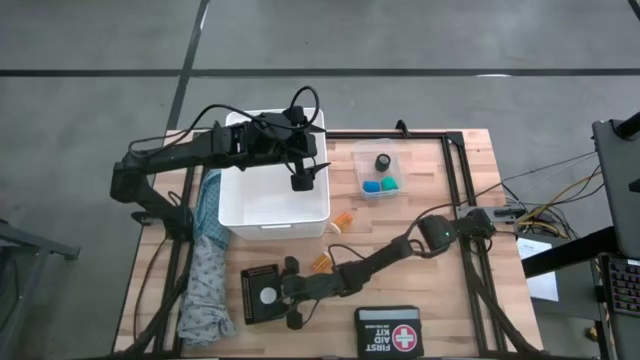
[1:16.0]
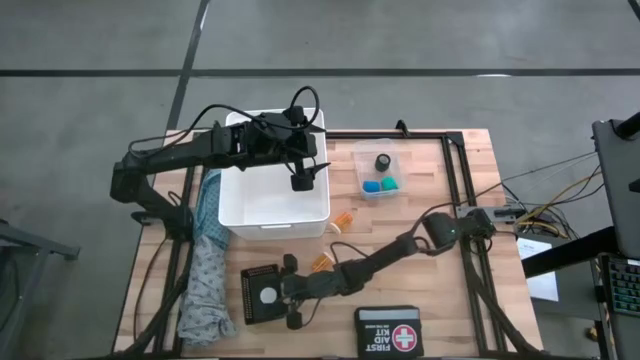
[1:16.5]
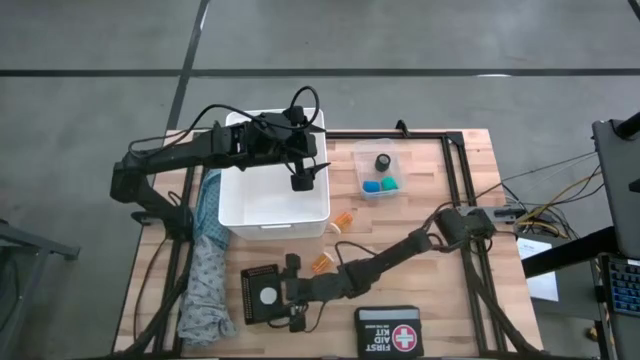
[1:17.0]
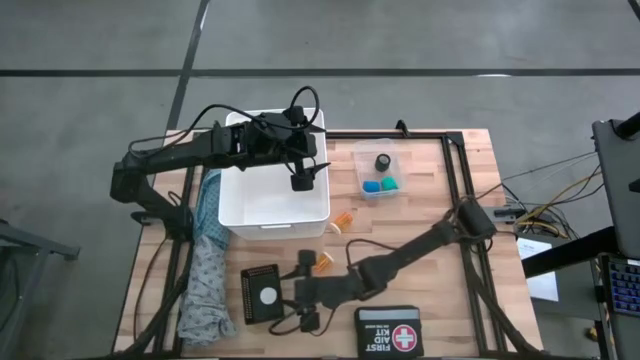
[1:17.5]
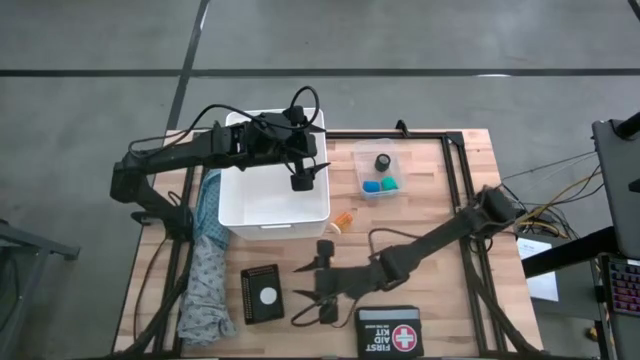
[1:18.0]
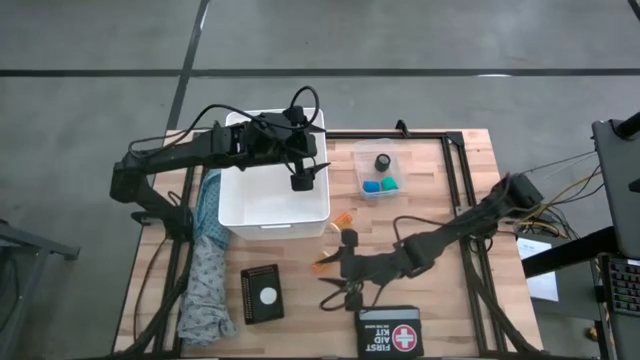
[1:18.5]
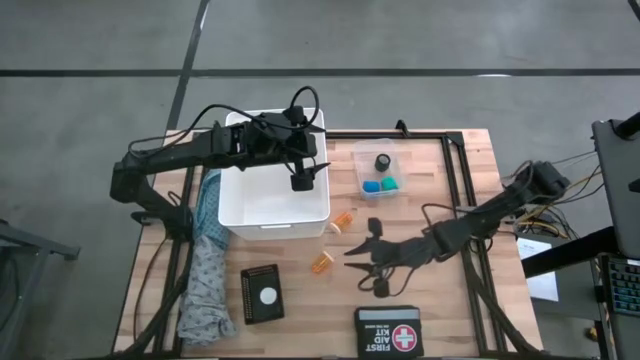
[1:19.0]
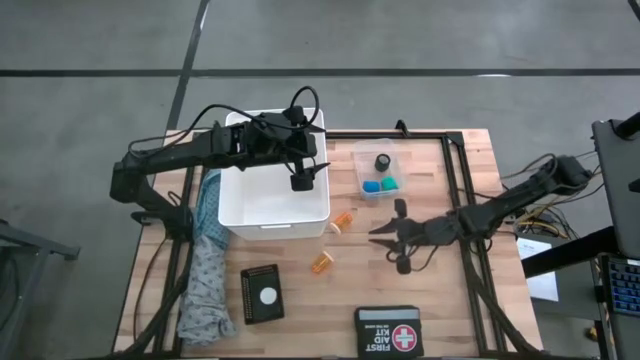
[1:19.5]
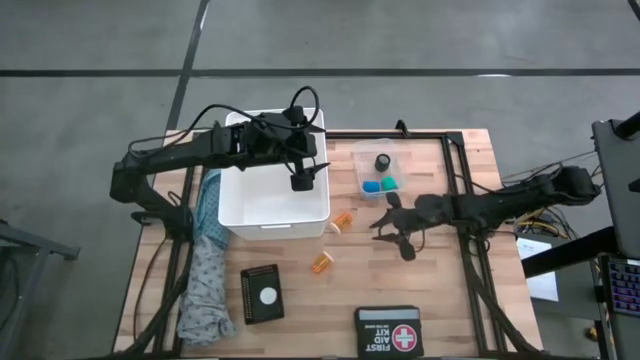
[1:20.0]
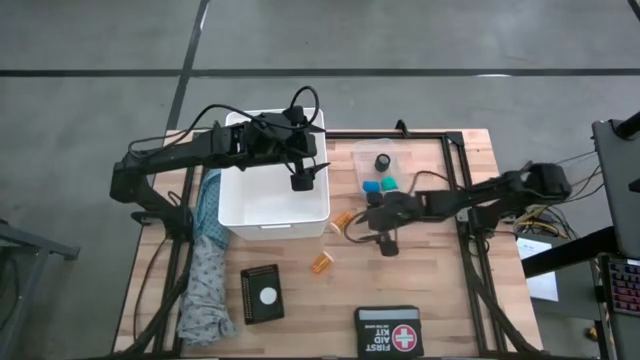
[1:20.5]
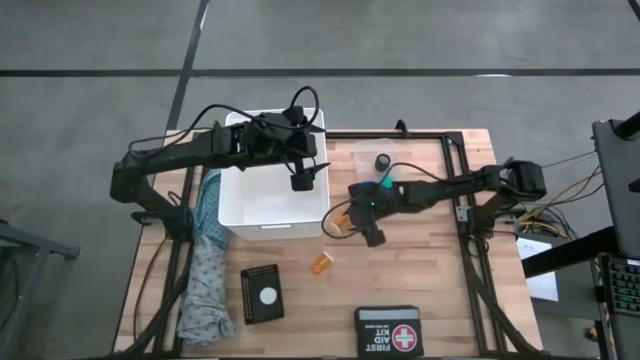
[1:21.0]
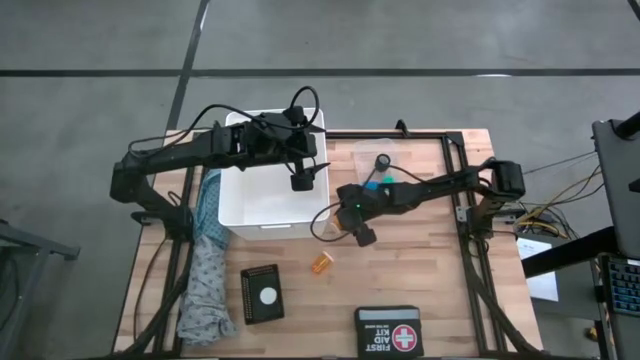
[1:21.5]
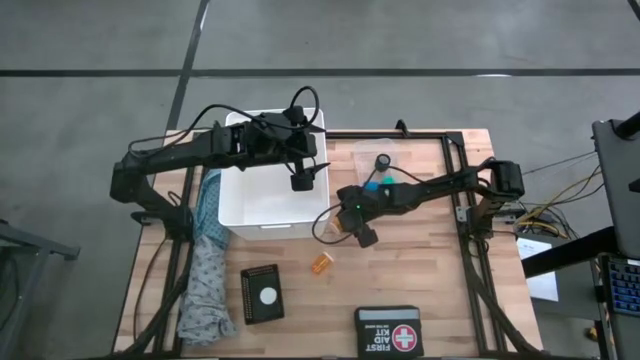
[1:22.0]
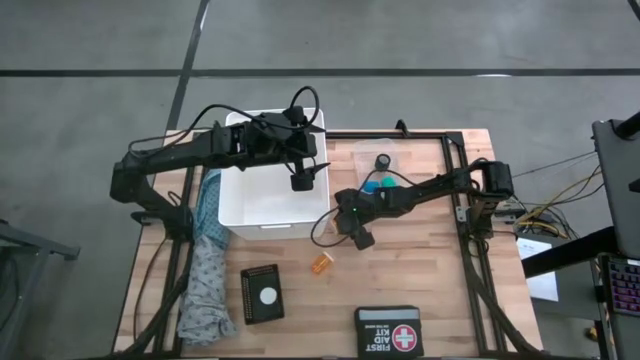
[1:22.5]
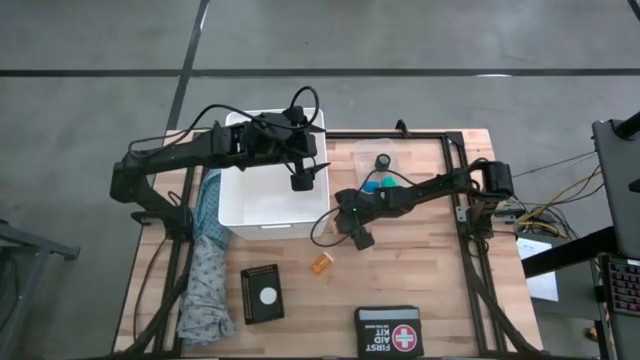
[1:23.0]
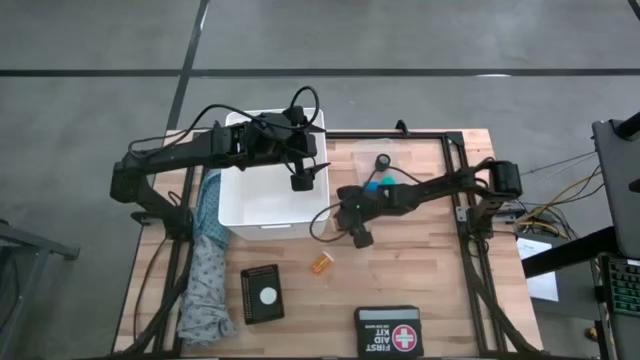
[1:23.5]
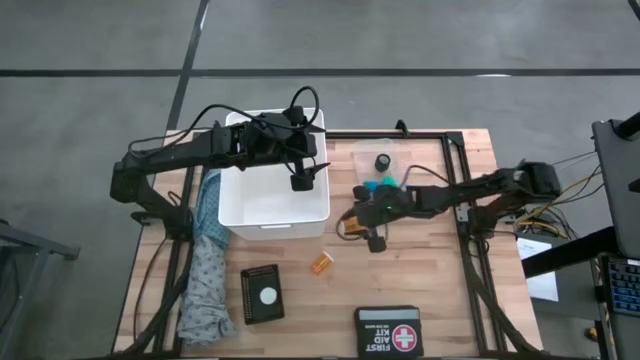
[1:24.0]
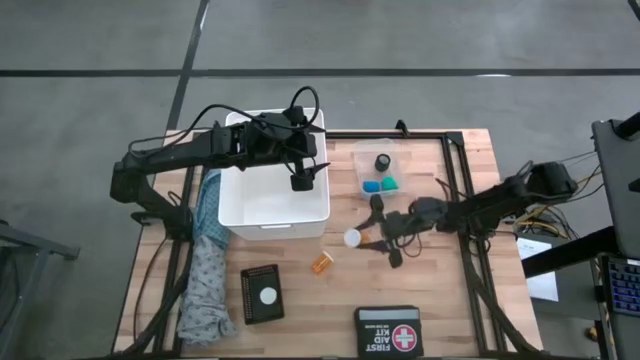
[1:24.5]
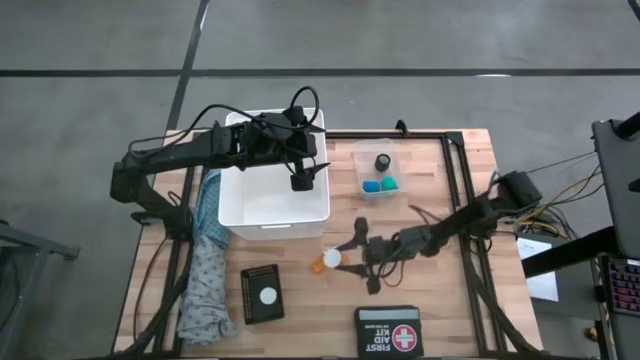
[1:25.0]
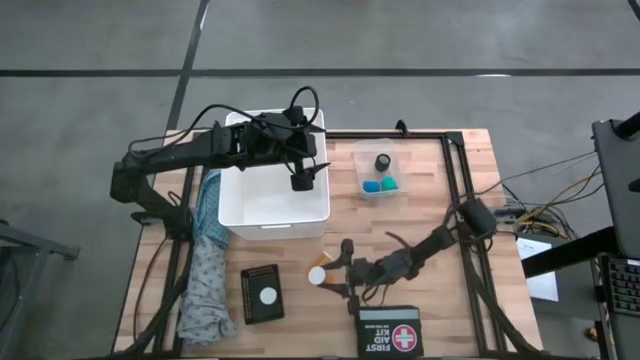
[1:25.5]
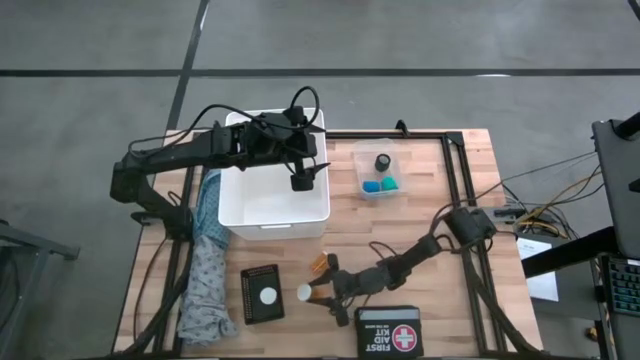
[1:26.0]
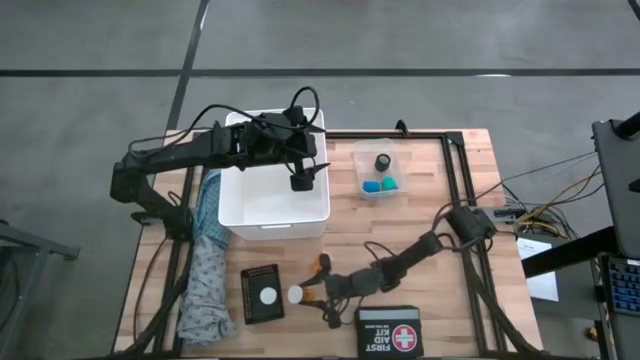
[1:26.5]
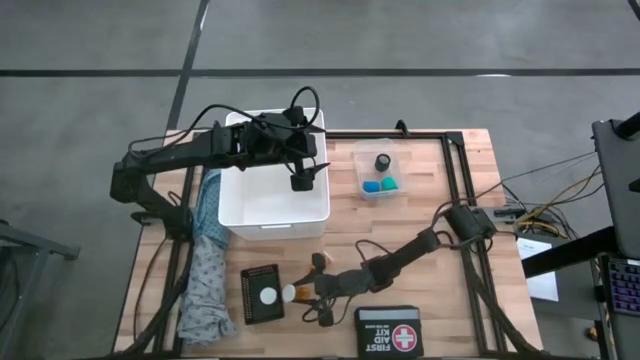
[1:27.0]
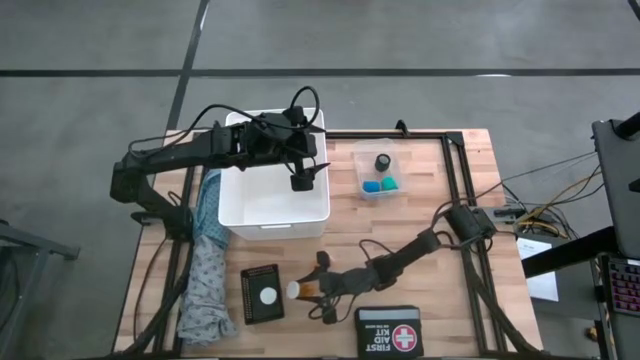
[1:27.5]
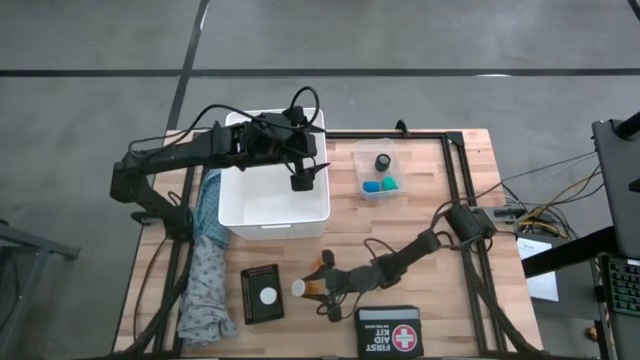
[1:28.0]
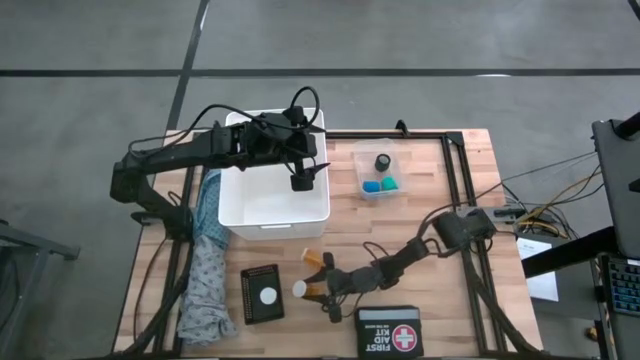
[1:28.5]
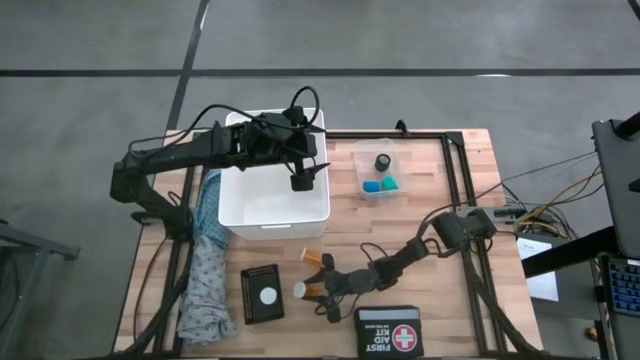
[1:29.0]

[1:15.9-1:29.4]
Task: Pick & place medical supplies in basket/bin
Put the top orange pill bottle into the black bin

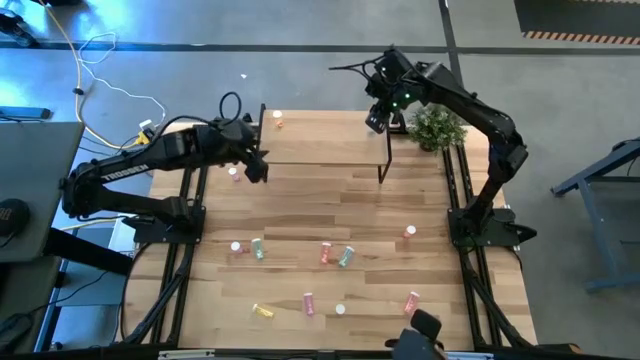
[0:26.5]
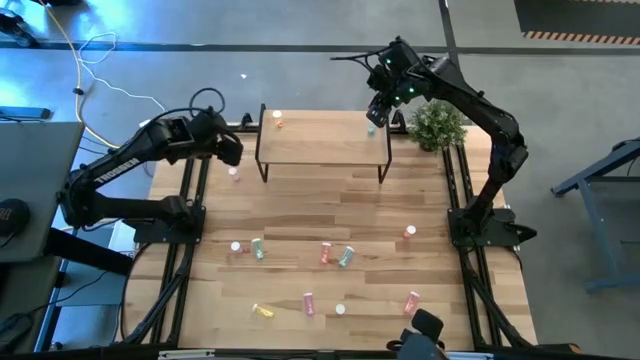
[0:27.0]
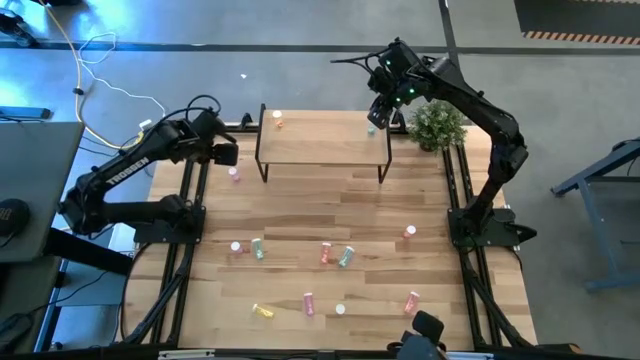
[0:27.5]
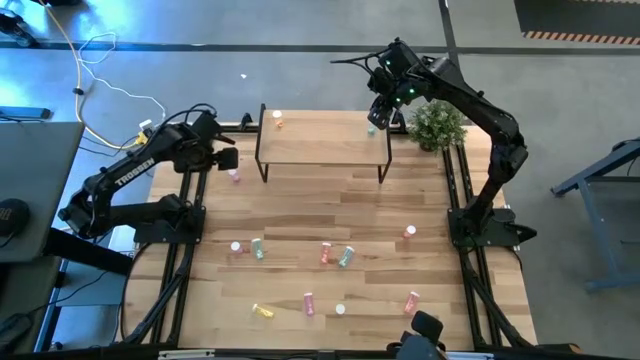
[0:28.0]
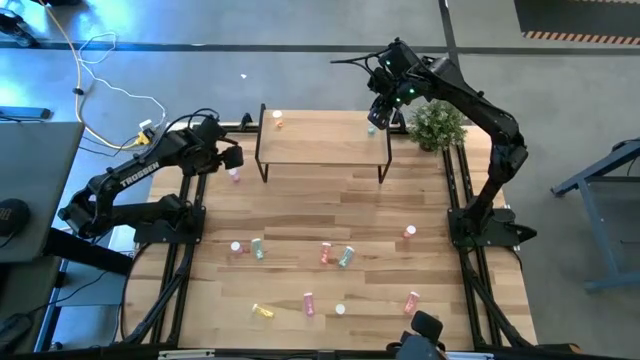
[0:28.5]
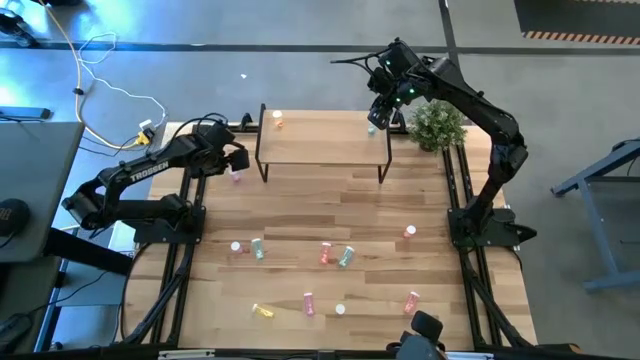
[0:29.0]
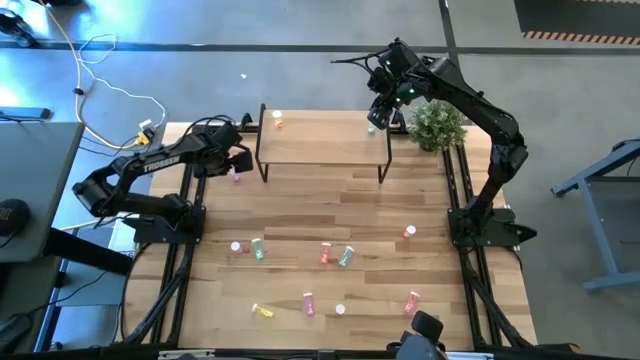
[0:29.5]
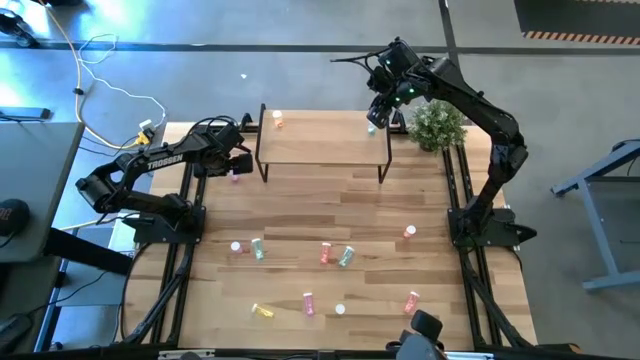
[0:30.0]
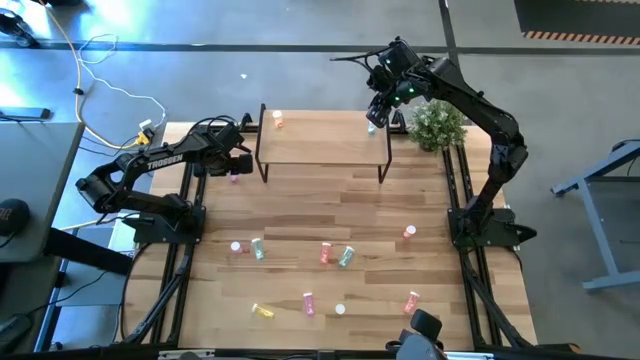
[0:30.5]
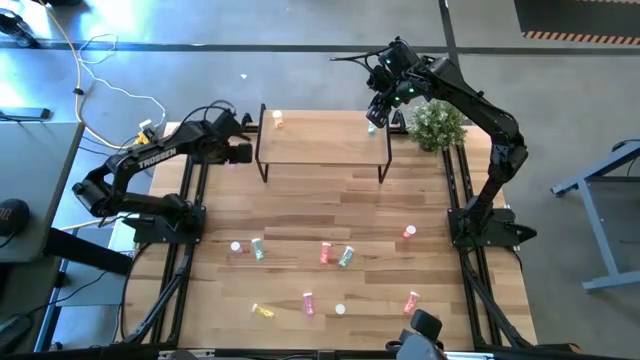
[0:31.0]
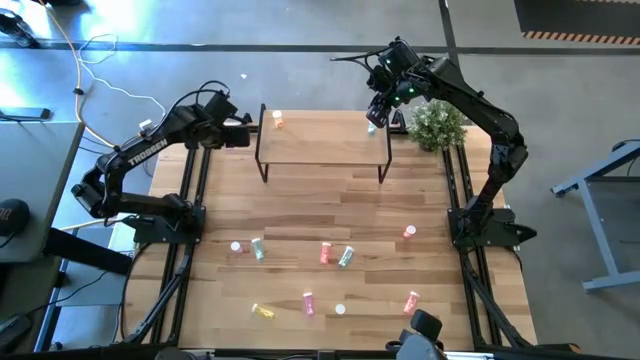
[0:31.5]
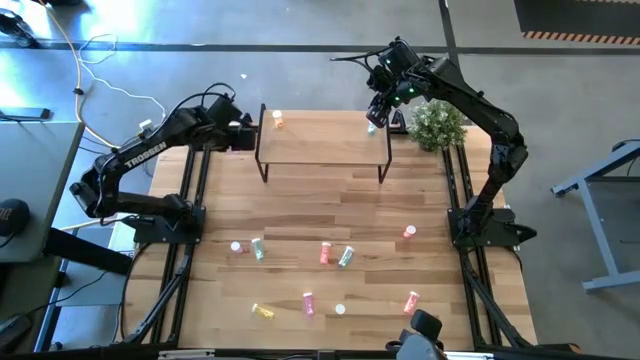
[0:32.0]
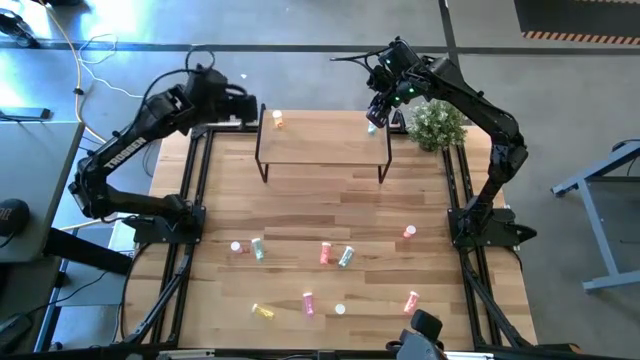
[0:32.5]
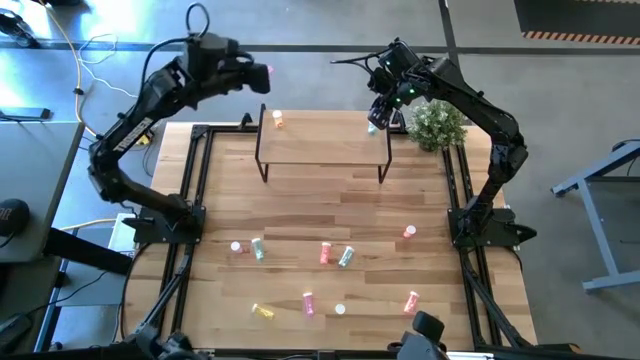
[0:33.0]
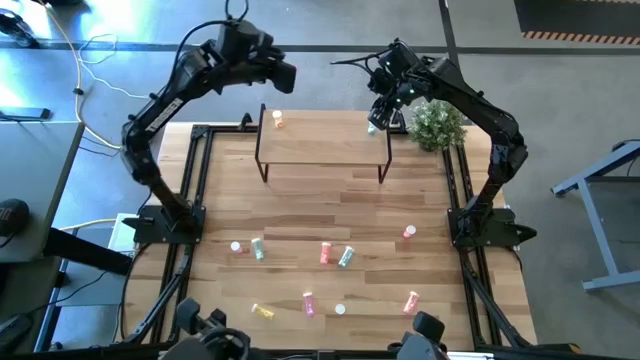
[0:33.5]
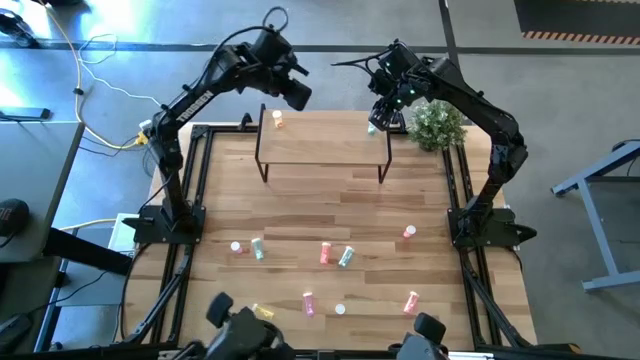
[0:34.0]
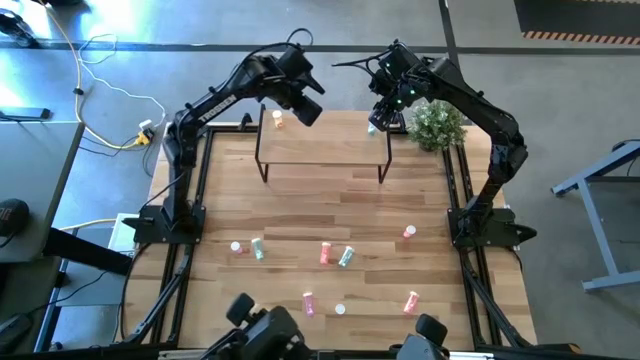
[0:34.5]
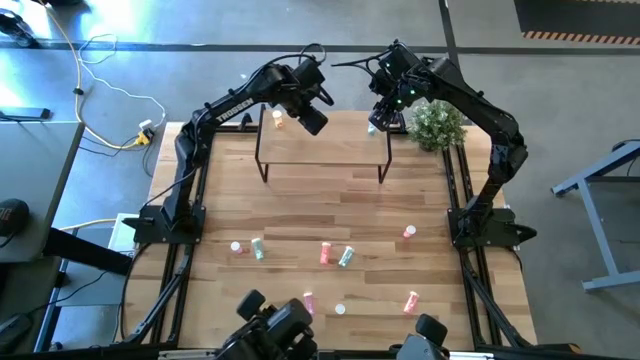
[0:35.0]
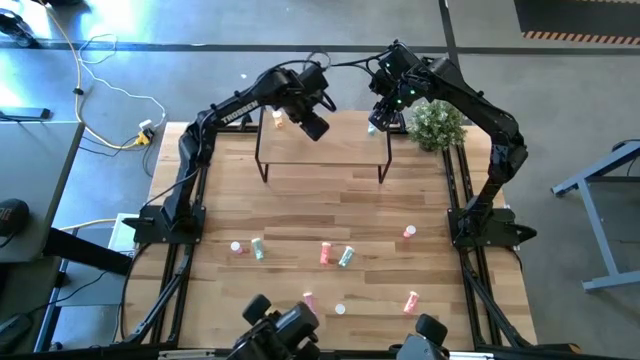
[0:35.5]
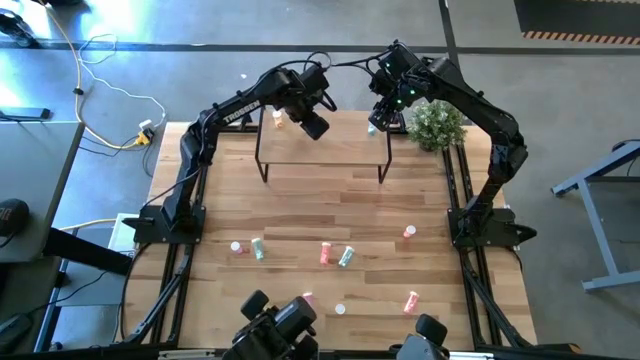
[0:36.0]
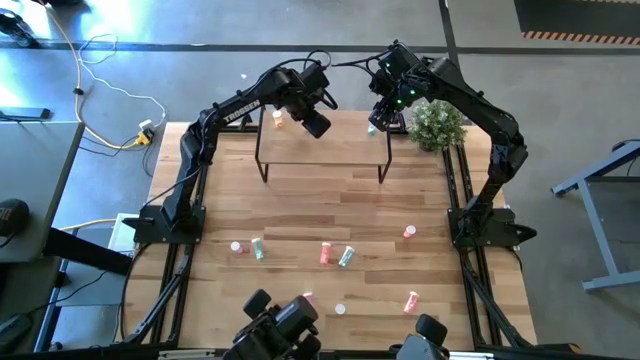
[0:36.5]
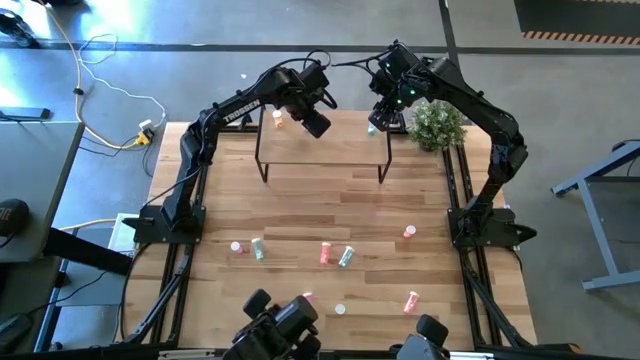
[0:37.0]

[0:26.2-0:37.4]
Task: Pick and place medicine bottles onto shelf by color
Put the top purple pill bottle on the shelf
